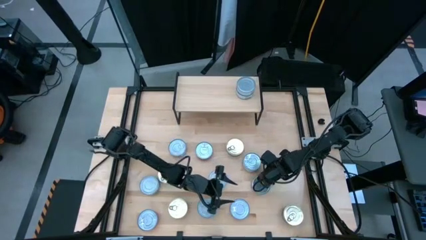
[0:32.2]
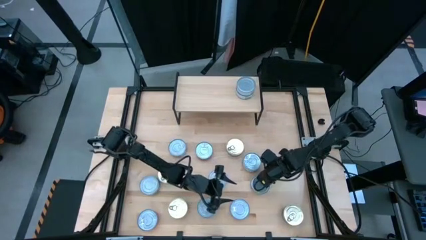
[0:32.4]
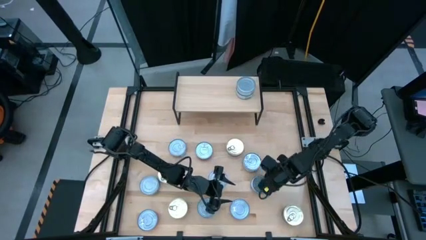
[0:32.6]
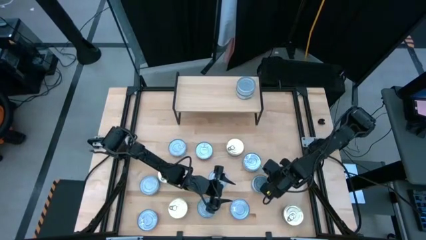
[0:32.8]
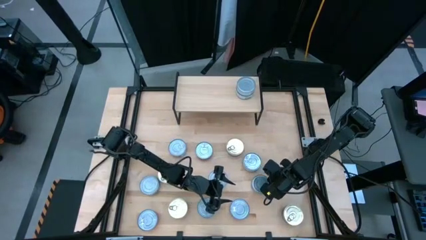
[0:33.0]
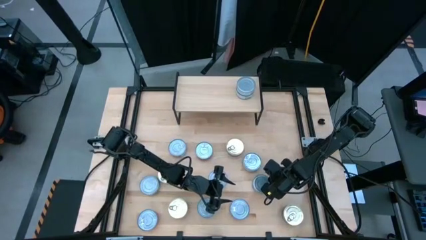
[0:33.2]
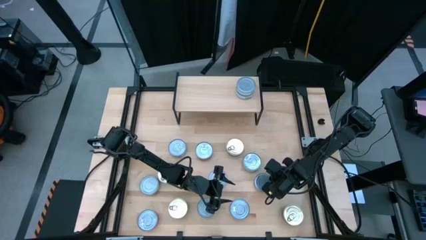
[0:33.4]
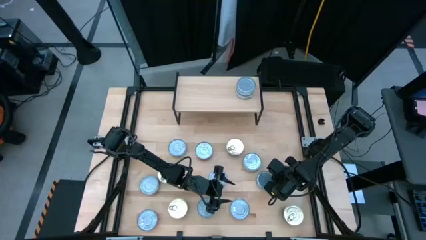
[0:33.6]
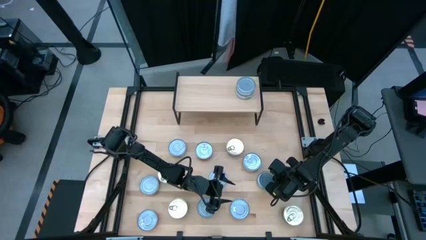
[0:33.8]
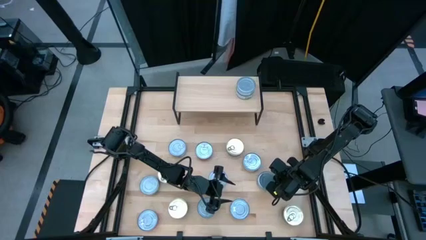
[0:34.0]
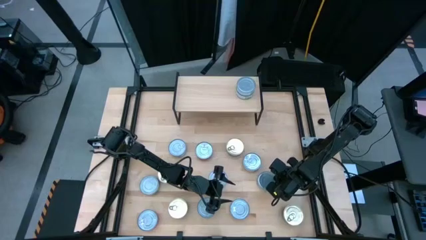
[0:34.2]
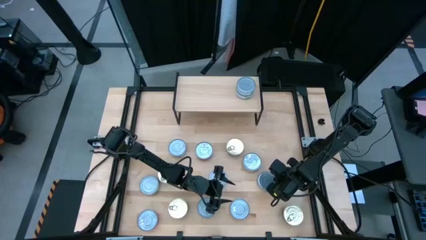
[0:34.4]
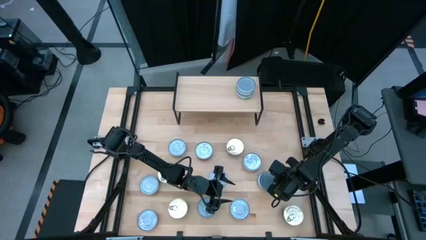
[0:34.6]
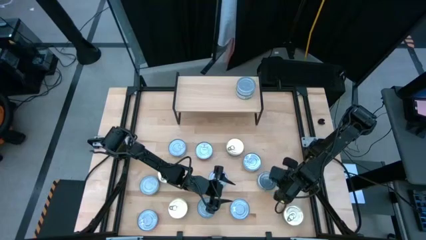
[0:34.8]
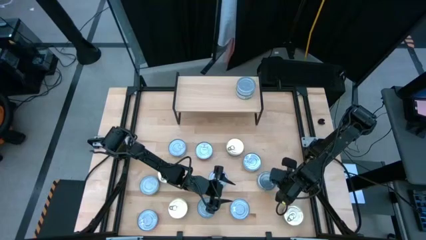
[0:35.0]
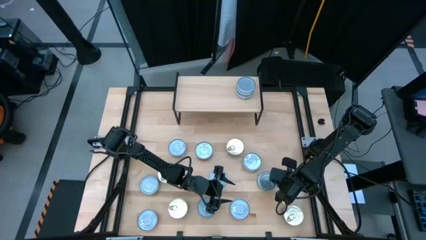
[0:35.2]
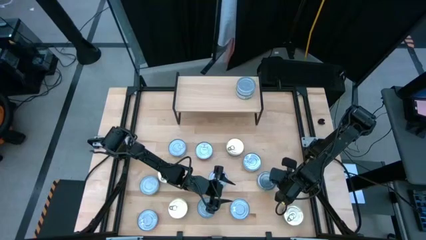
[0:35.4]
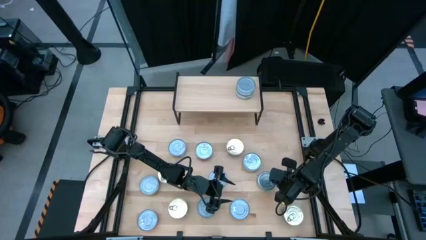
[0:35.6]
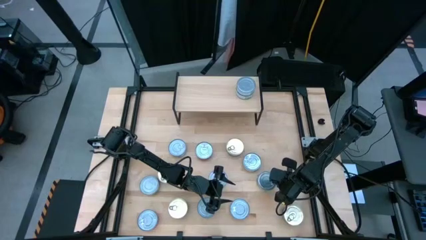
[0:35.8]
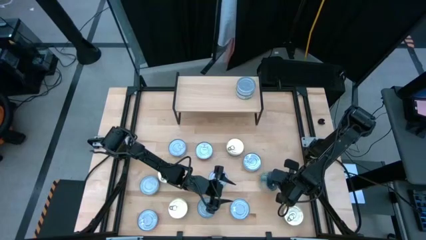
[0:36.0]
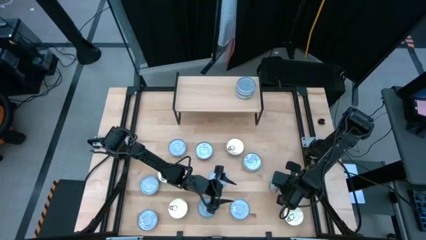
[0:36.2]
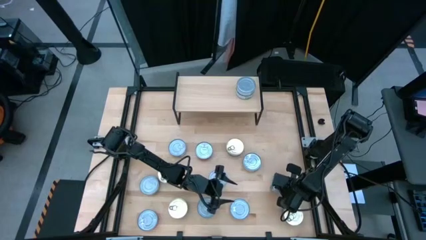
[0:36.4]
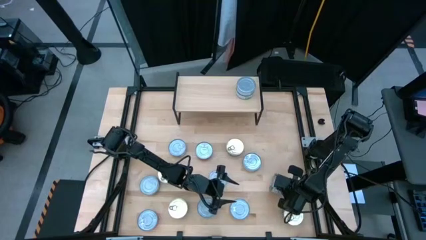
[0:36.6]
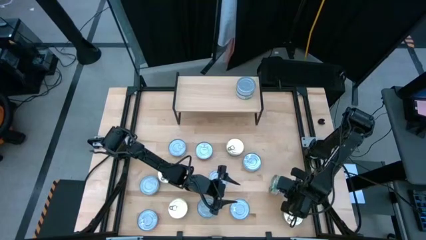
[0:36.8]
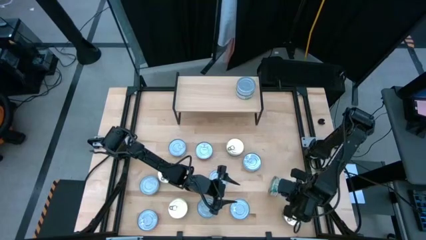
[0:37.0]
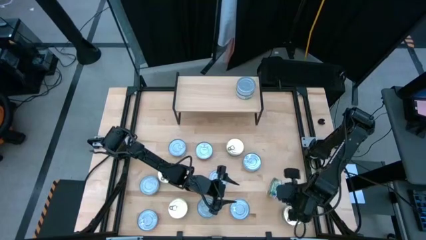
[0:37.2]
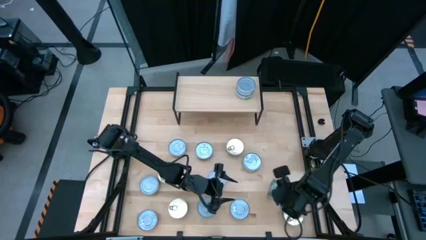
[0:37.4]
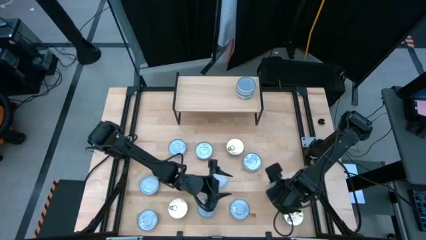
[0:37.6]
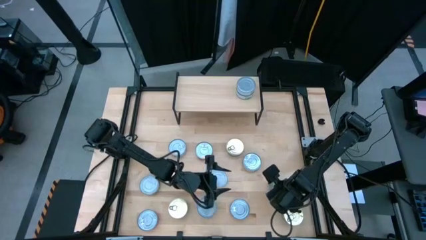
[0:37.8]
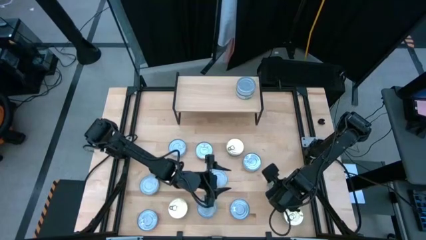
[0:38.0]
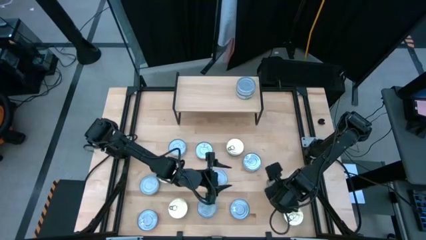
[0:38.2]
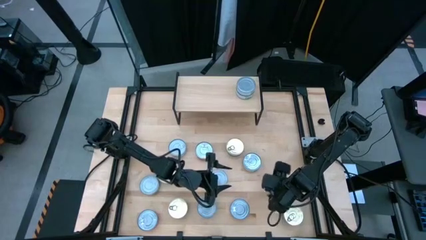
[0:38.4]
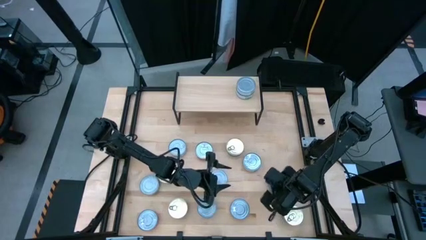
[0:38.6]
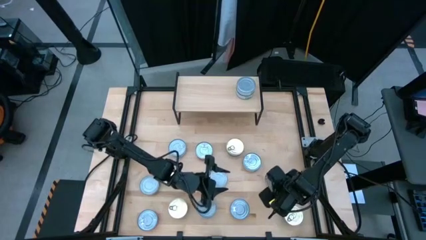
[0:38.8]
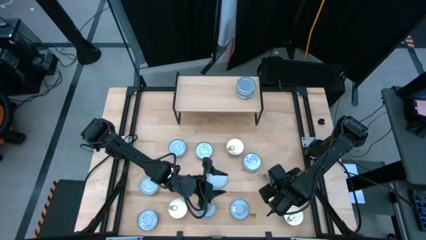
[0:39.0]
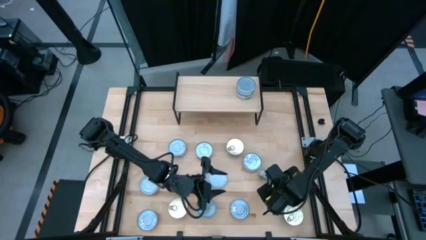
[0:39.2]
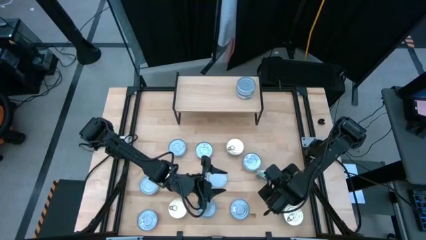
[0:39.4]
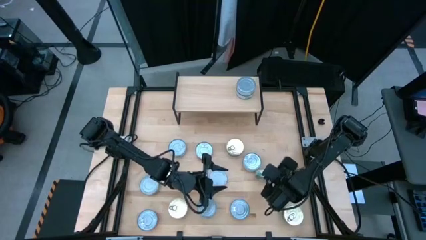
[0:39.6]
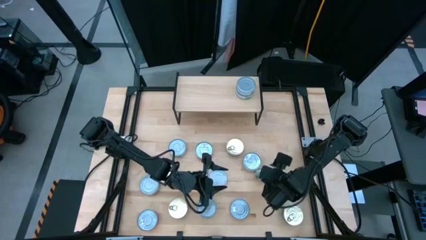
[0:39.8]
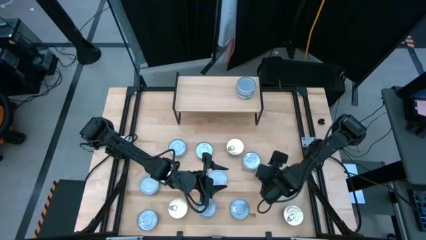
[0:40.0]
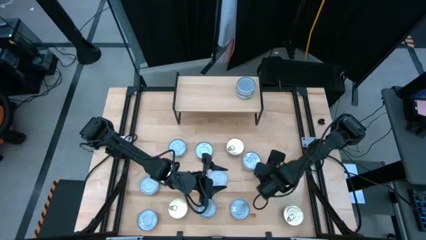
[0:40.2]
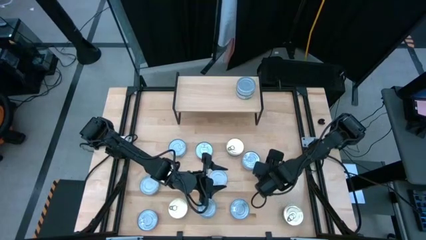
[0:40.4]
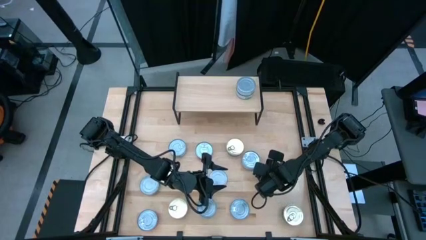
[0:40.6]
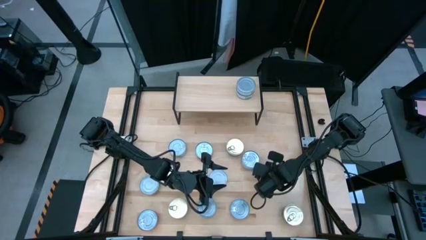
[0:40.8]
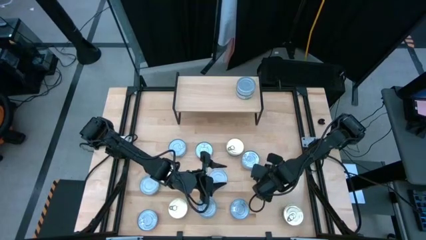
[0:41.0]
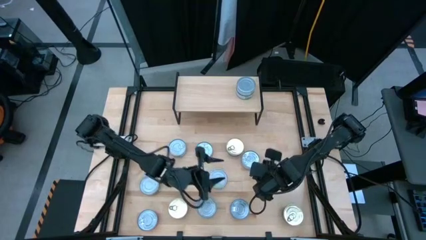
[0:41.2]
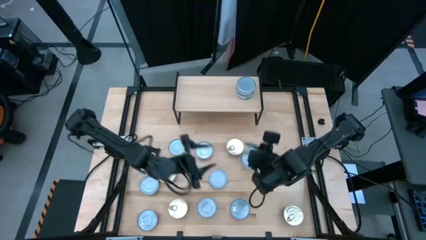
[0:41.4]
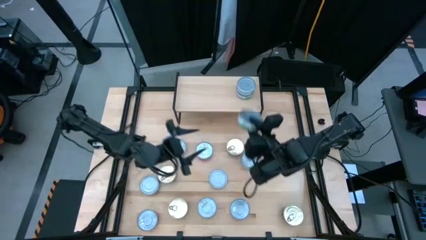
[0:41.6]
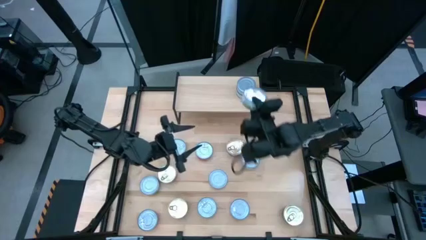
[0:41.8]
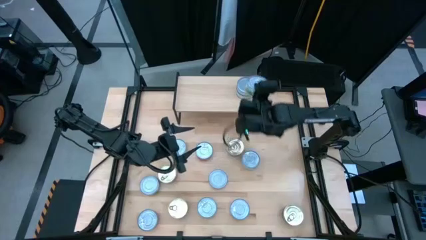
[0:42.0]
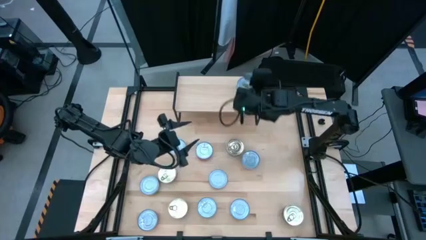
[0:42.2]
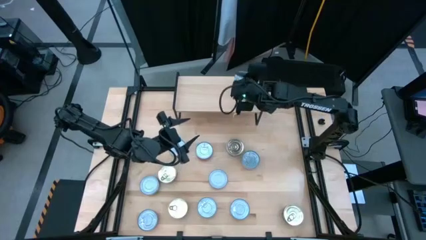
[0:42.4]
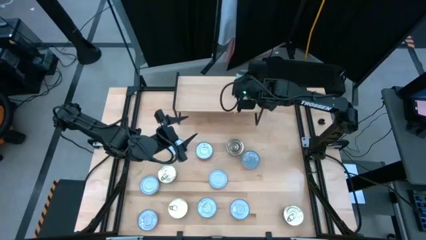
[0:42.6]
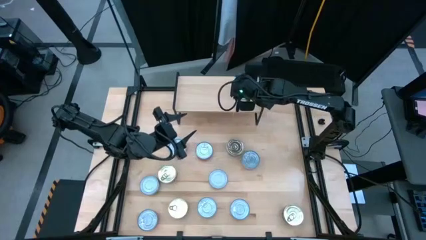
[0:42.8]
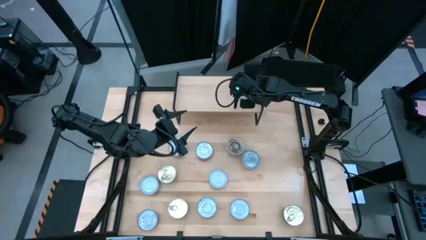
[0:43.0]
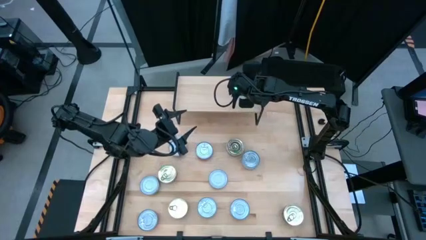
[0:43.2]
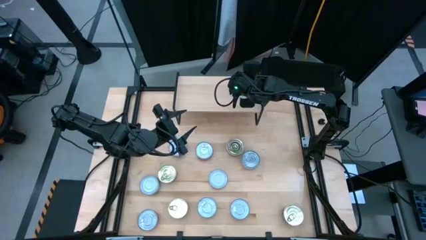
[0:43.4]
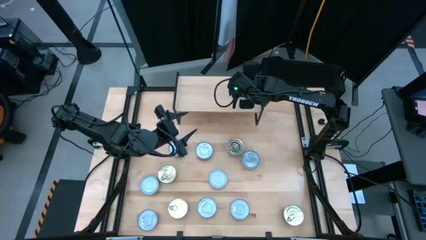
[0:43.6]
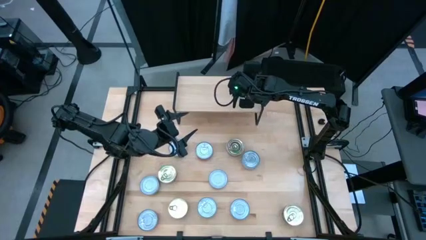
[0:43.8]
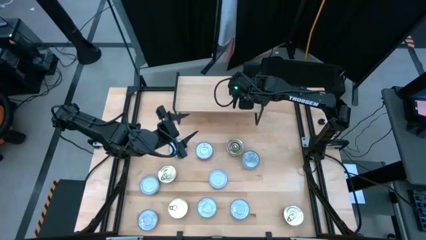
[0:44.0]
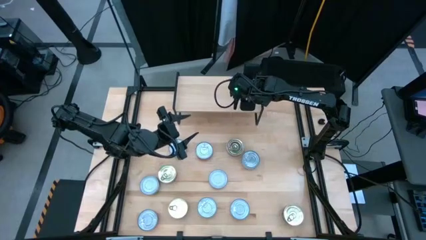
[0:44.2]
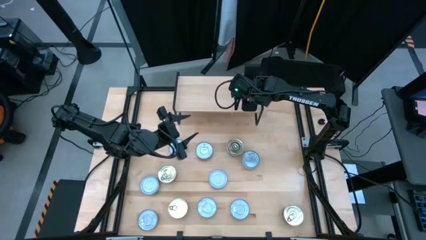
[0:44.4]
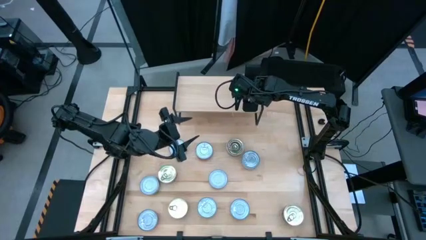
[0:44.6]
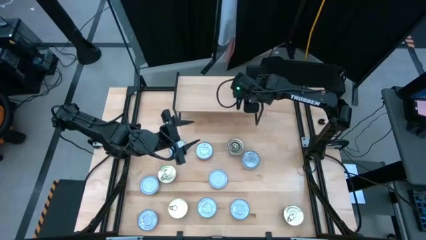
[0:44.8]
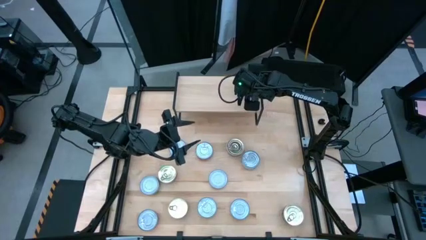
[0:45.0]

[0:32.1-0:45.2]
Task: Stack canned seafood by type on shelf
Stack the green tuna can on top of the other green tuna cans on the shelf
